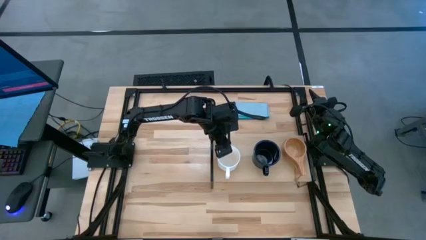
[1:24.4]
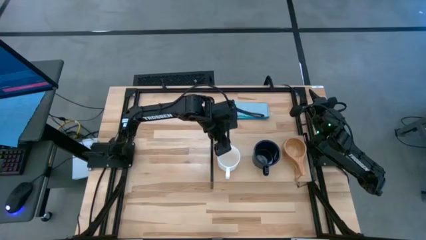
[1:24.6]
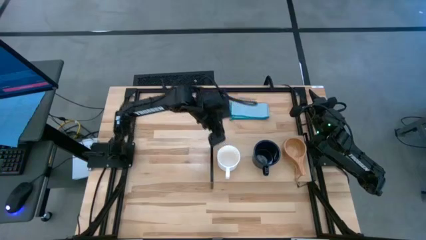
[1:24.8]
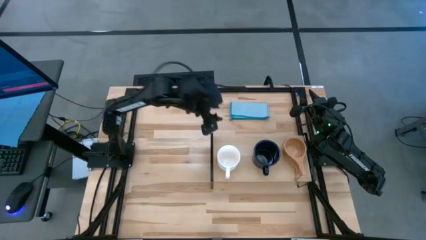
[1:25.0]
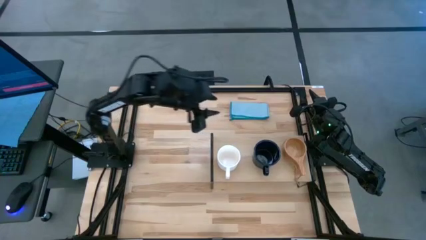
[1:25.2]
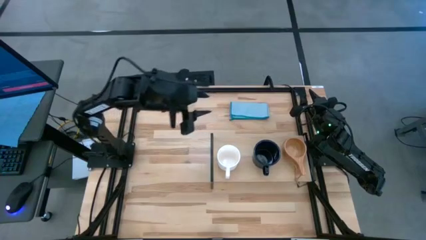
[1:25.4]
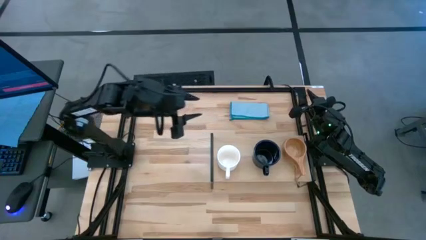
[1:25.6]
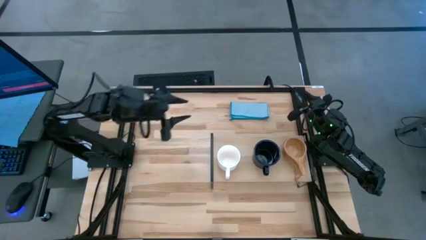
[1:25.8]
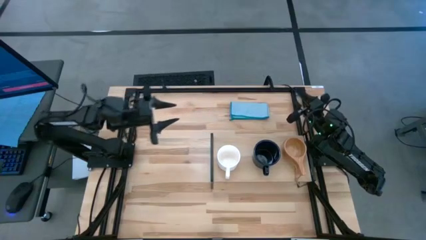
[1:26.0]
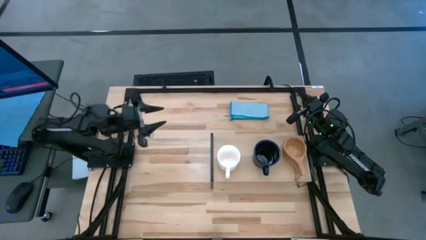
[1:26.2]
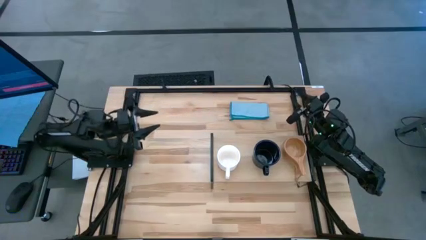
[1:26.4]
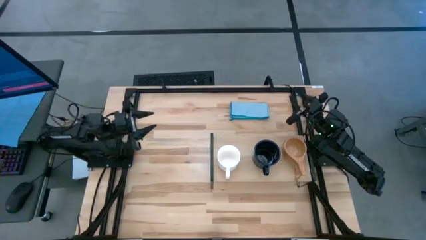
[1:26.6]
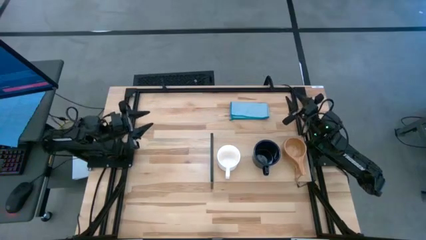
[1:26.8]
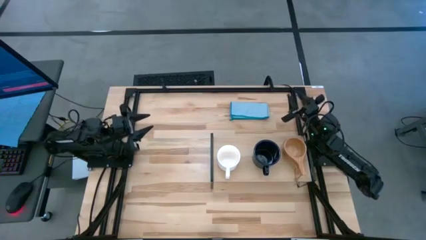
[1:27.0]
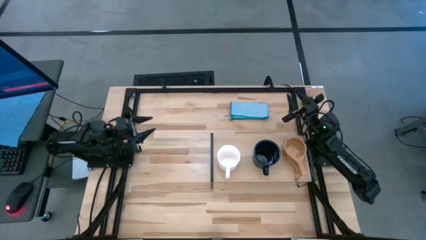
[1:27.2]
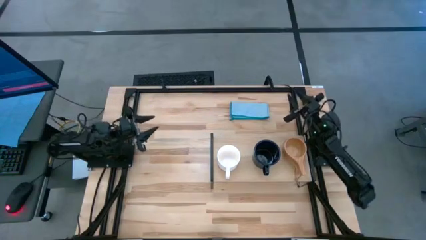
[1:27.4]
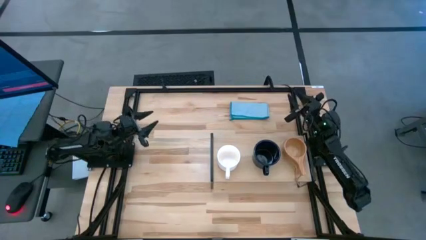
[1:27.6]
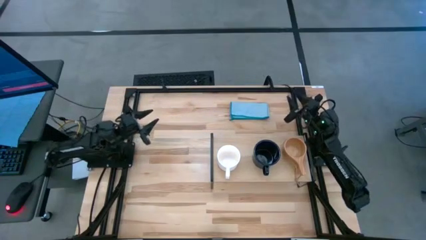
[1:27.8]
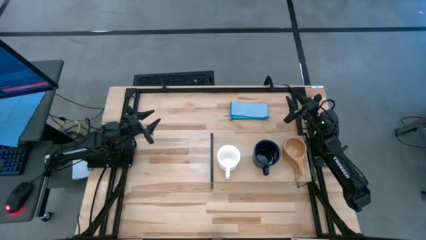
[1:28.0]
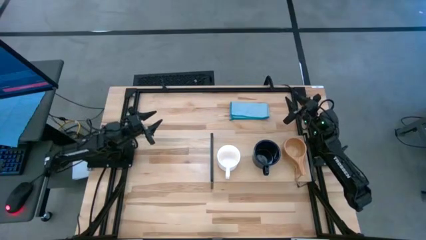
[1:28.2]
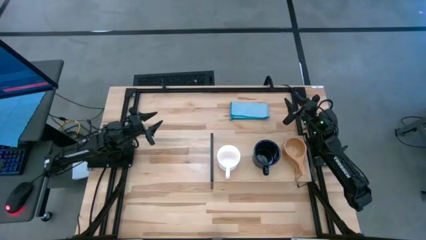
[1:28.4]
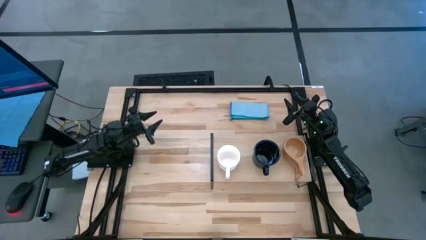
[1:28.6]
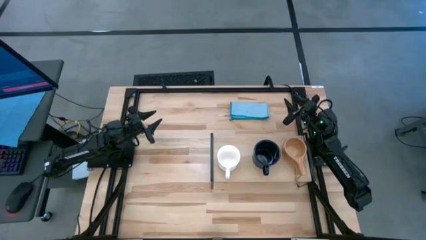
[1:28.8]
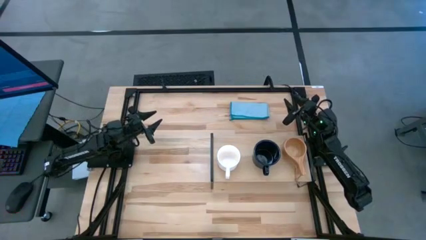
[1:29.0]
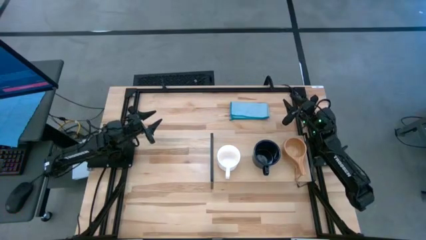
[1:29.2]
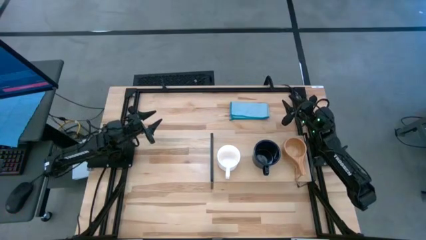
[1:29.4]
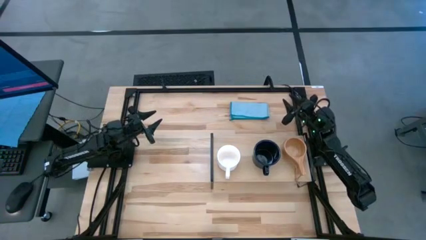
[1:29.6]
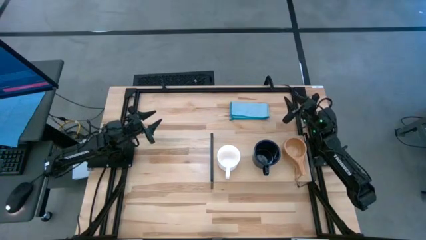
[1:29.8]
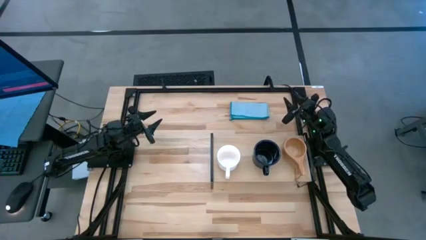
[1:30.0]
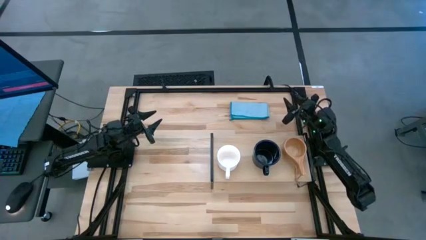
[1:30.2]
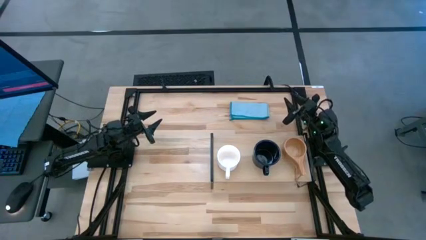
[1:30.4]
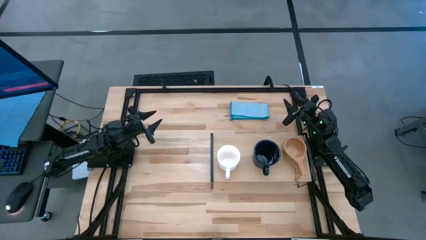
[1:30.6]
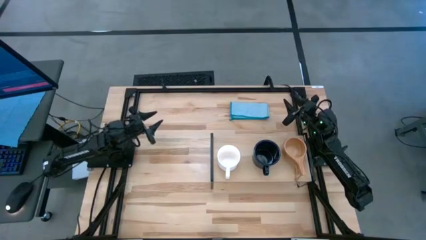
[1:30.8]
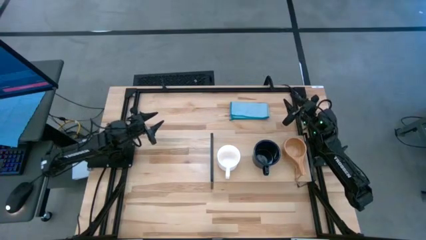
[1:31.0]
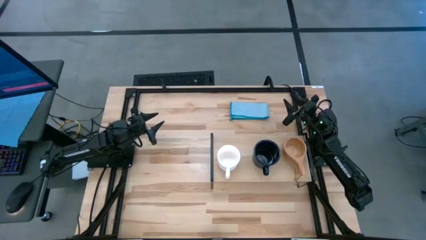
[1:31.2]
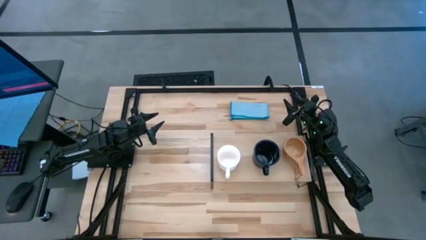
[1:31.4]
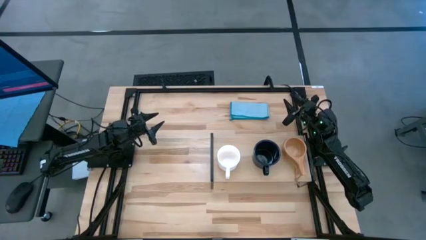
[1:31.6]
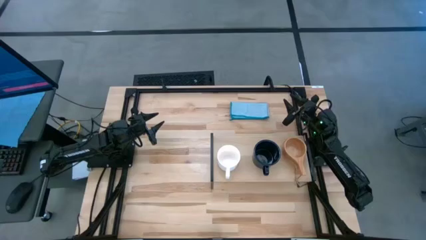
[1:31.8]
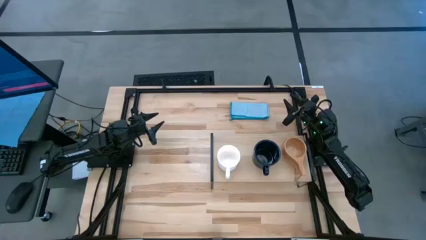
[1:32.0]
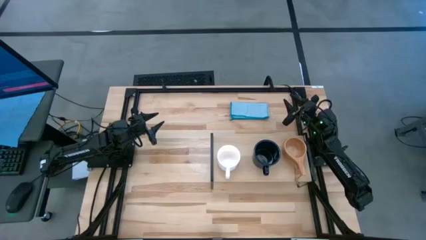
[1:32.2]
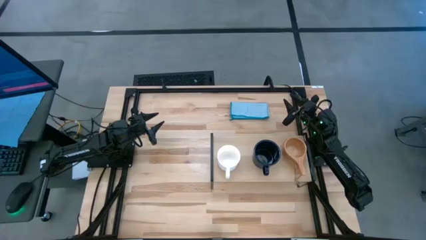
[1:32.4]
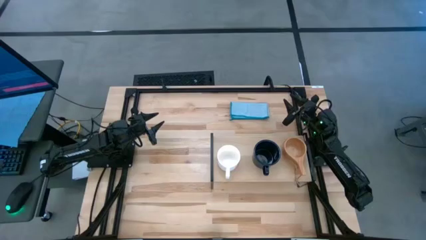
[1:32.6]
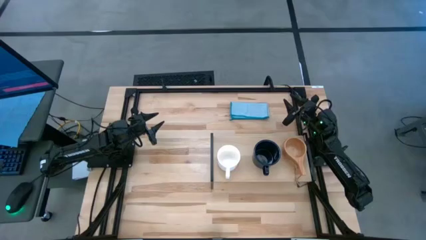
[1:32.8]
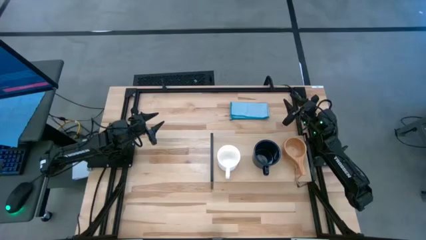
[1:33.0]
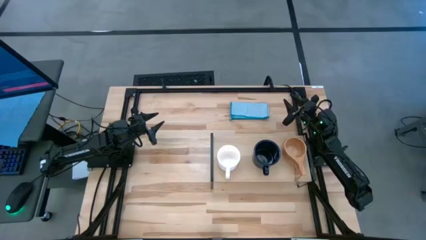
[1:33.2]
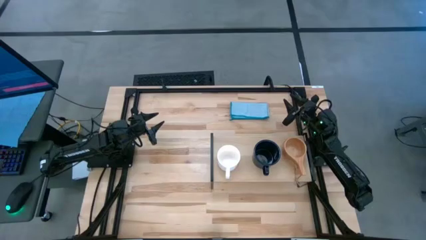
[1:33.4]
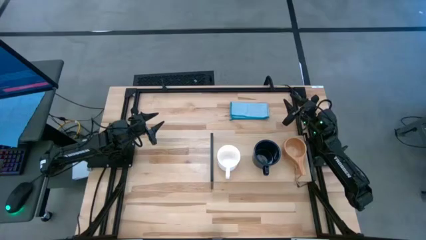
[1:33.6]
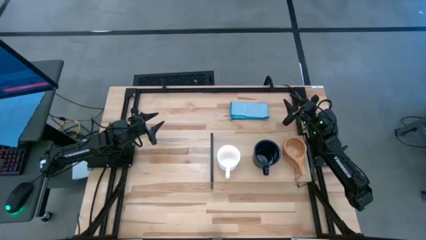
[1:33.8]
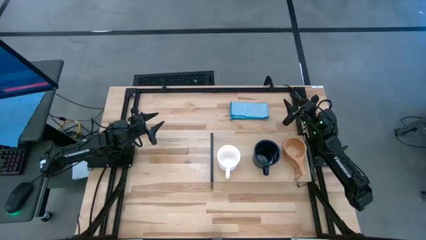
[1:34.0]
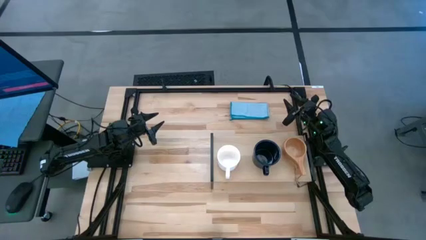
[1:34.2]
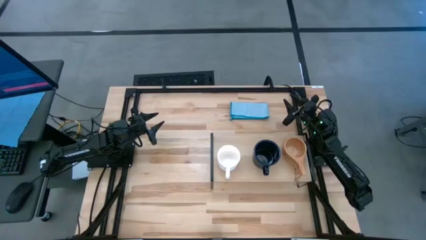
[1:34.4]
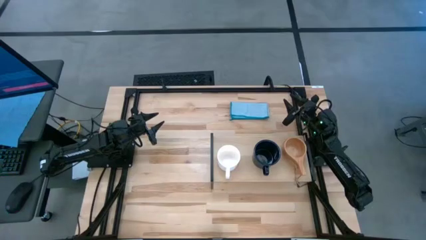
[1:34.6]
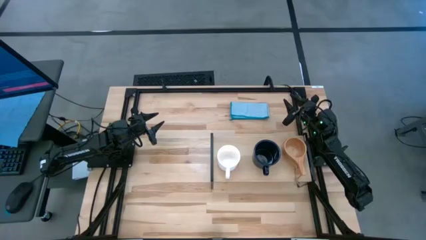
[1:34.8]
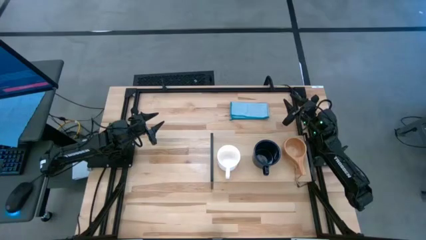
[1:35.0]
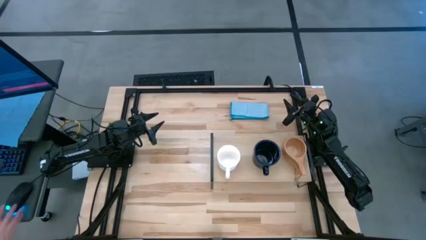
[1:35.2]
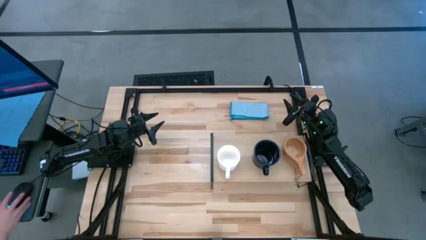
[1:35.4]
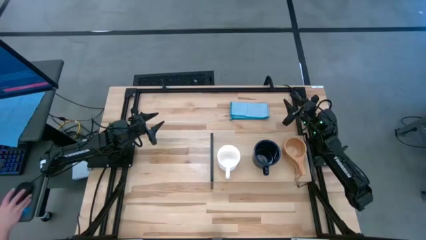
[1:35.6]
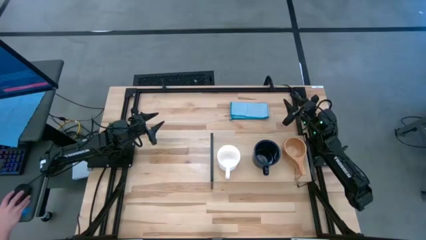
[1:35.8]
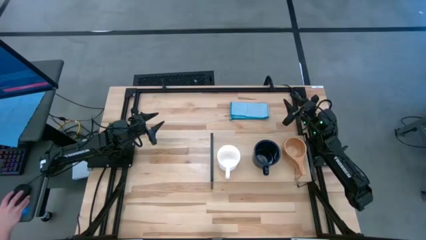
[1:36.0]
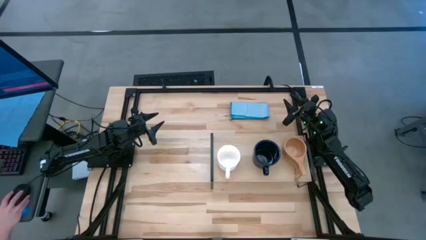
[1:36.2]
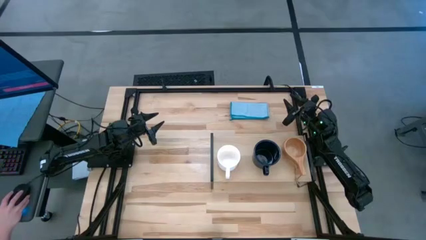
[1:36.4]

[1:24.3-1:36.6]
Task: Stack small to large cups/mugs on shelf
Return to Home Position
